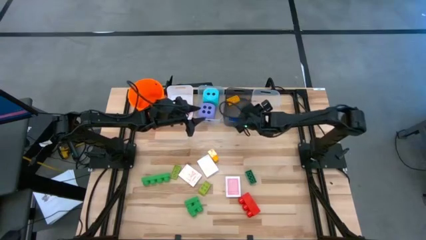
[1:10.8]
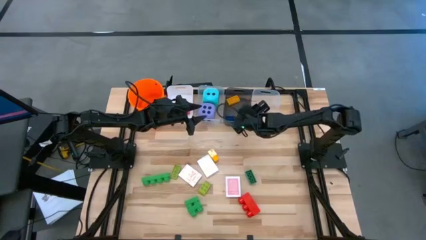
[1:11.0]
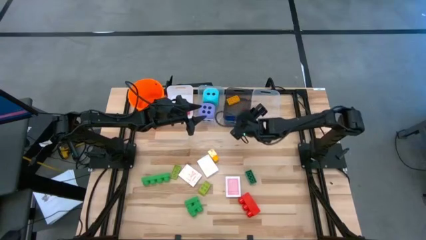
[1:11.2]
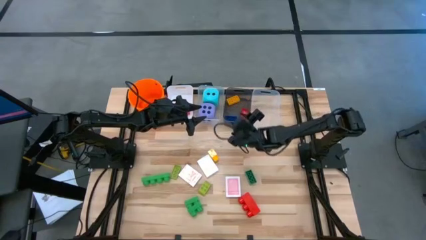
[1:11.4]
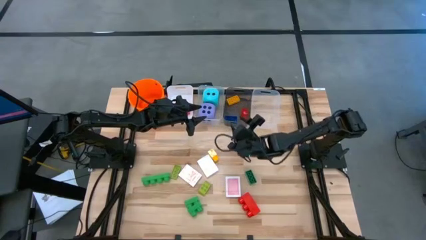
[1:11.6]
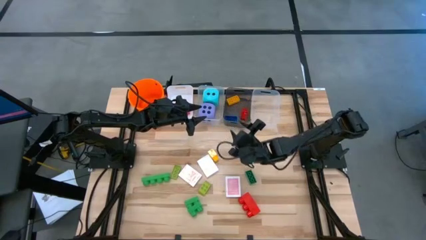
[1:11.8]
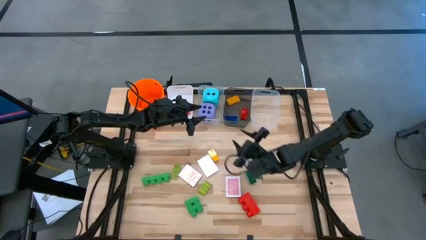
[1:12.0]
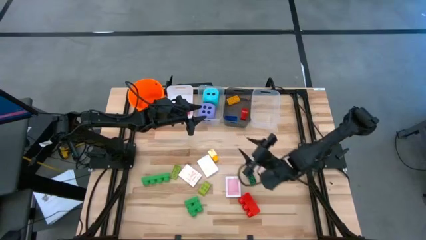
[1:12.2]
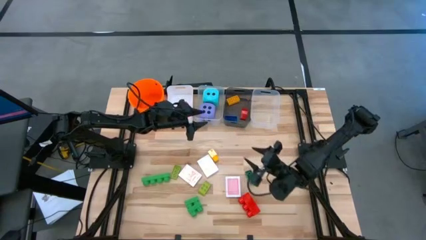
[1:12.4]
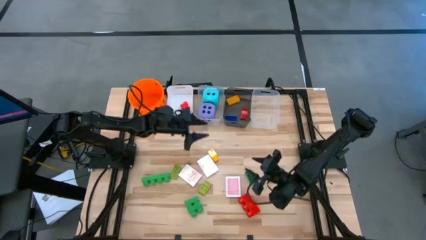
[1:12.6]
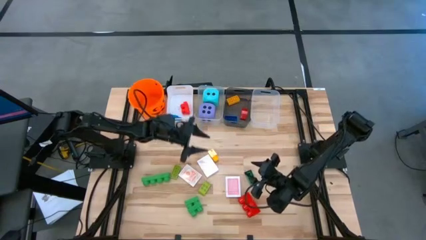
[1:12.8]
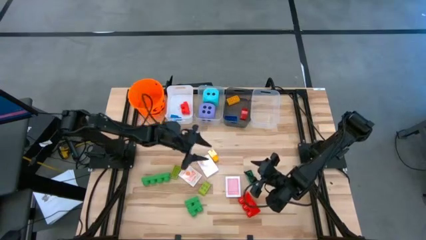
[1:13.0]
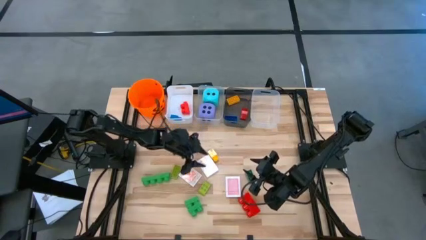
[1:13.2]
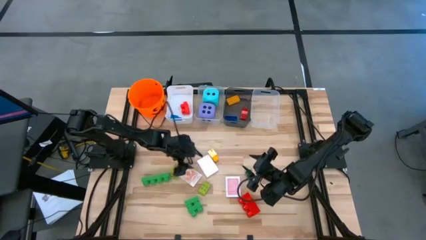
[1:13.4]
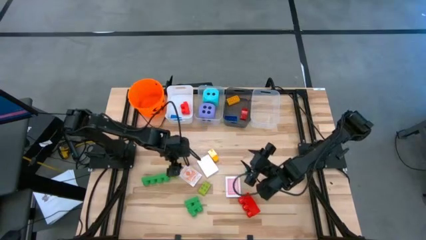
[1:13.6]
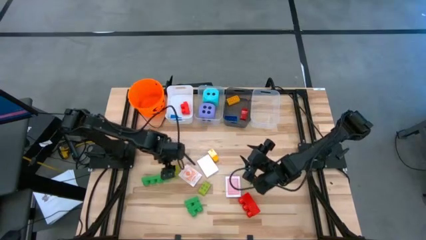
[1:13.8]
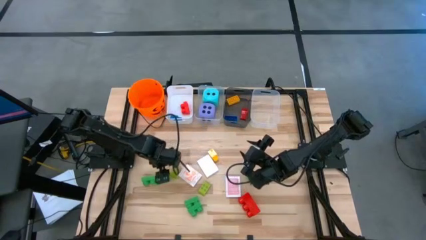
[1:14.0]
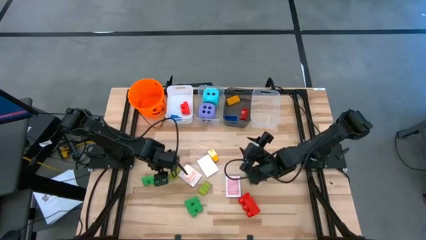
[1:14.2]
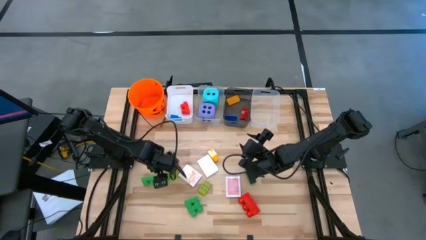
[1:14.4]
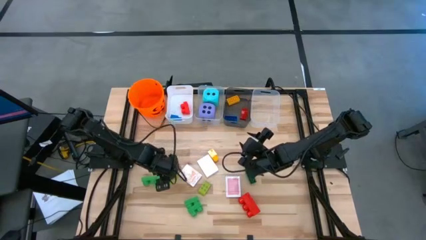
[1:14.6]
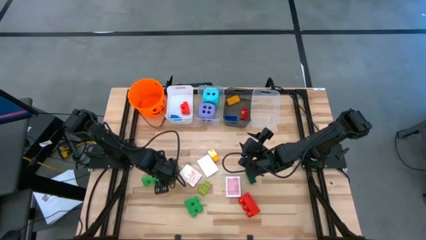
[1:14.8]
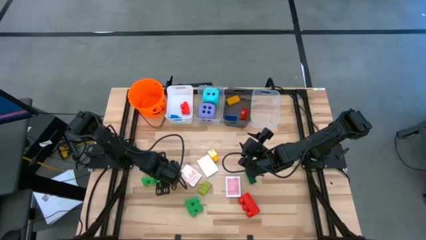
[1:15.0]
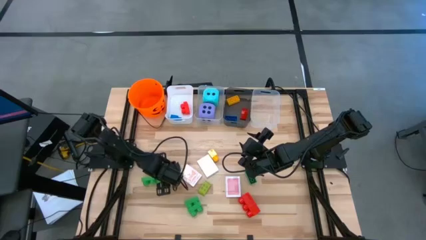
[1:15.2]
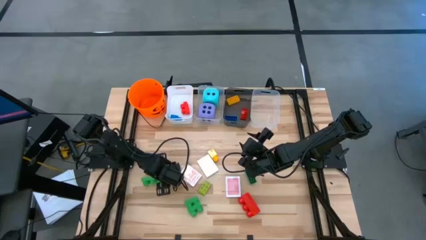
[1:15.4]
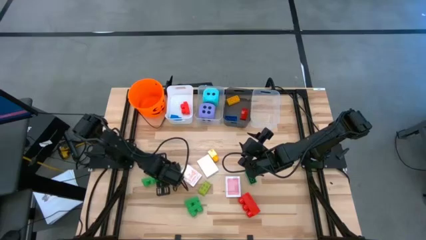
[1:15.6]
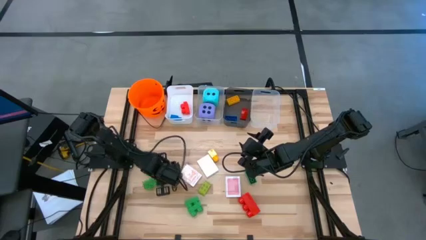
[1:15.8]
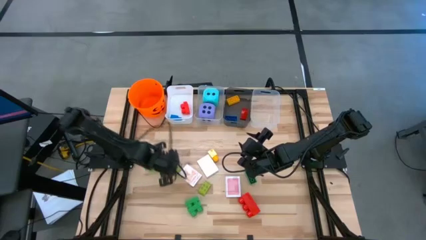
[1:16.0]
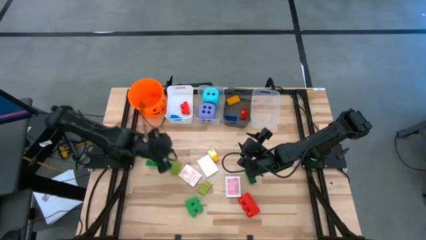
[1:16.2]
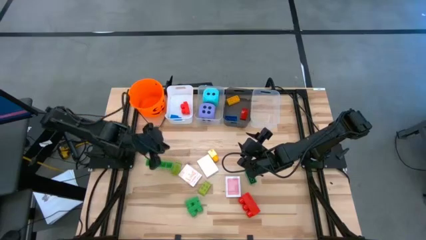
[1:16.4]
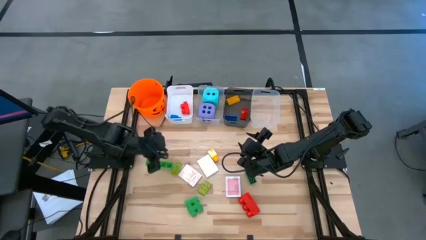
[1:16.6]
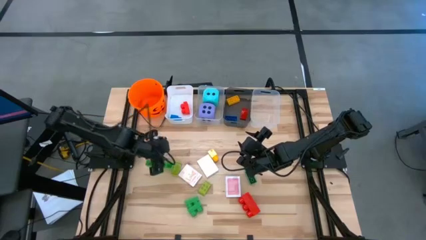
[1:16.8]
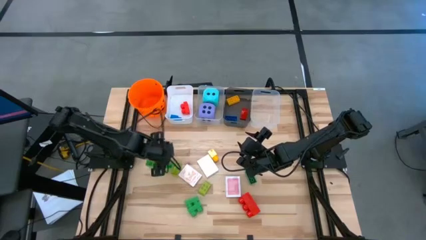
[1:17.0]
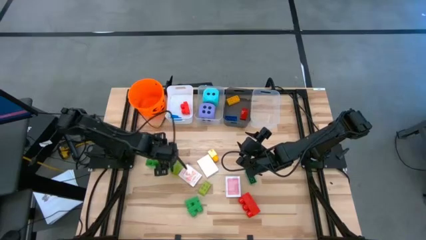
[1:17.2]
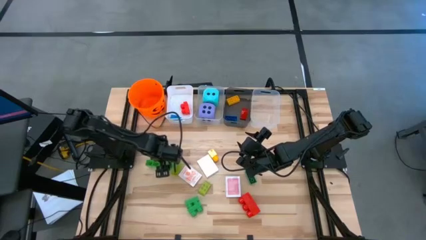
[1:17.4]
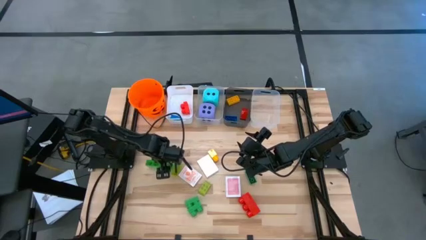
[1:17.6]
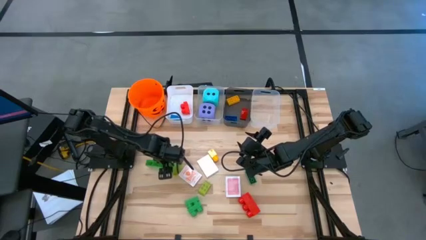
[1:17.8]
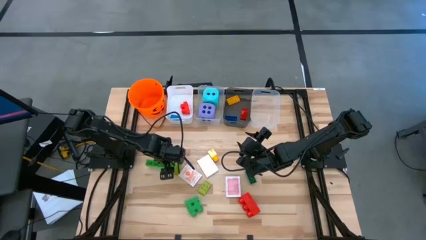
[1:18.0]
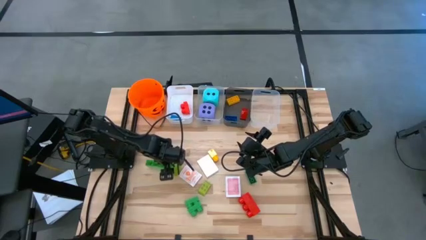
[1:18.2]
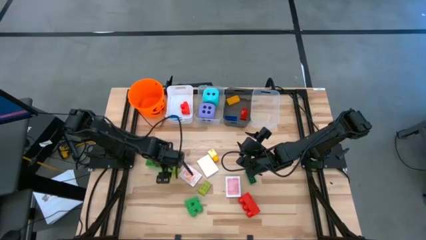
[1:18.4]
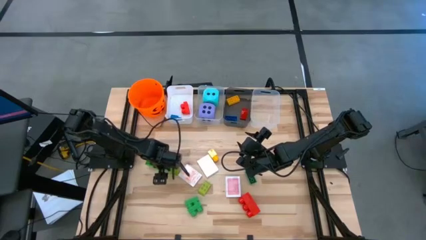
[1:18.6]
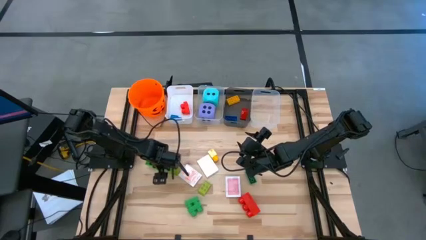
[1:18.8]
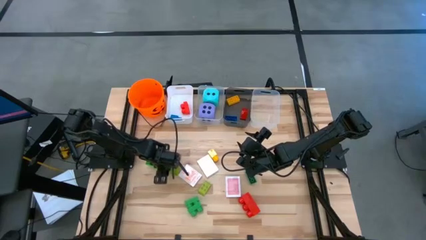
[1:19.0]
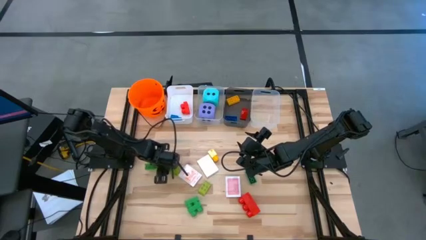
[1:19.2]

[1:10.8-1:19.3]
Task: Pick & Place Toys
Put the left green game piece into the white bin

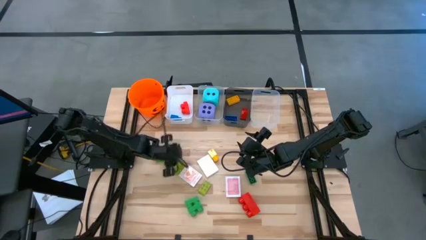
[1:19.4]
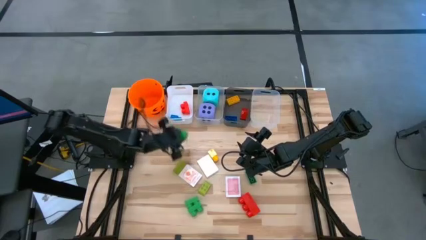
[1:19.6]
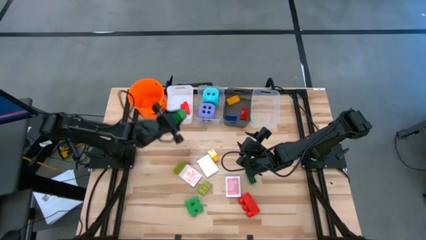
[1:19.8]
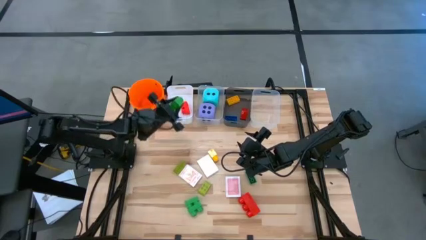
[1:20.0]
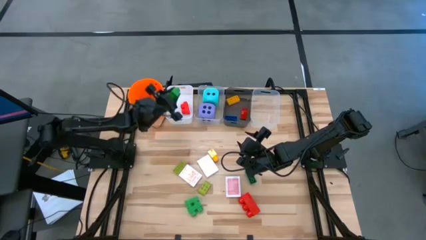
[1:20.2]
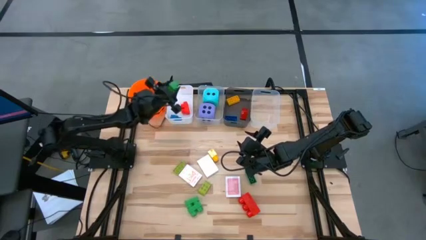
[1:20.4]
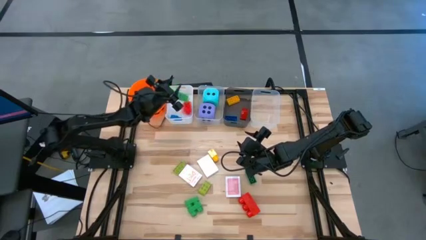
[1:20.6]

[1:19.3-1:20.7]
Put the left green game piece into the white bin

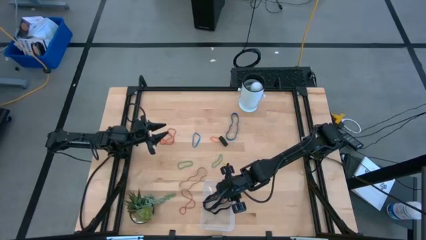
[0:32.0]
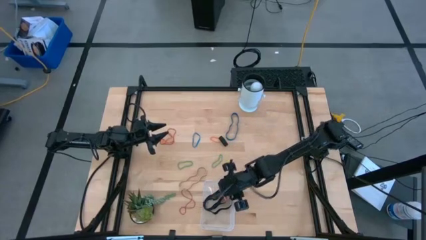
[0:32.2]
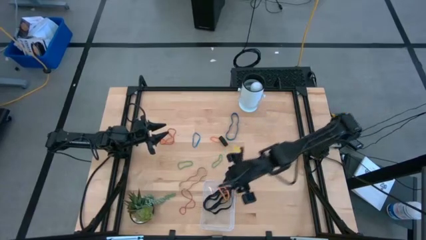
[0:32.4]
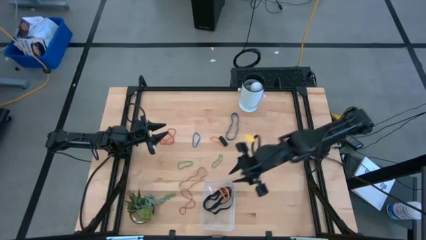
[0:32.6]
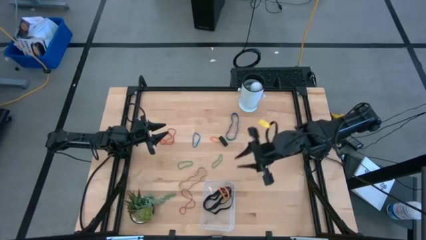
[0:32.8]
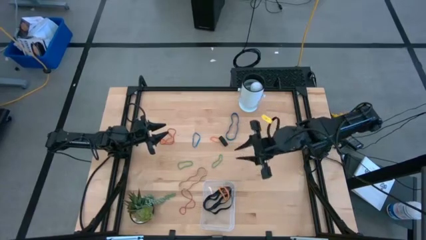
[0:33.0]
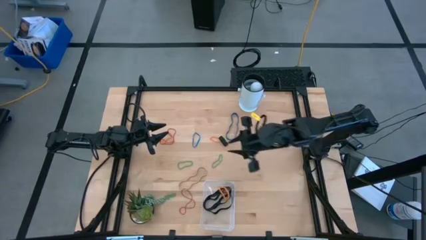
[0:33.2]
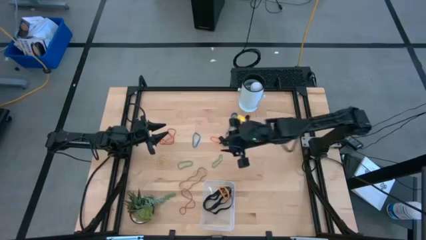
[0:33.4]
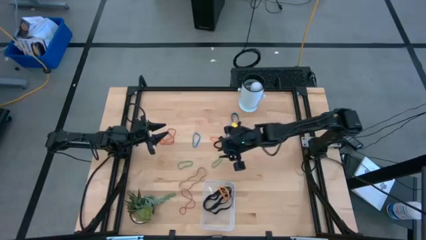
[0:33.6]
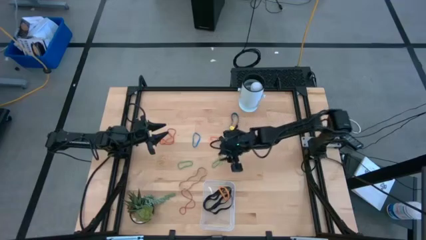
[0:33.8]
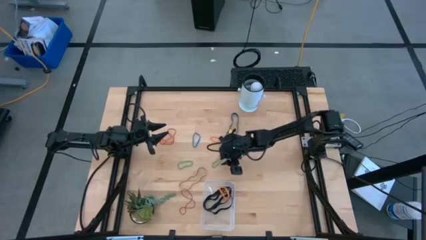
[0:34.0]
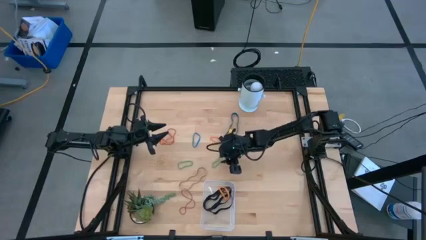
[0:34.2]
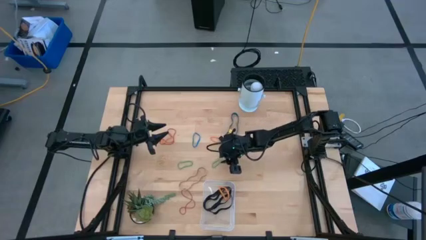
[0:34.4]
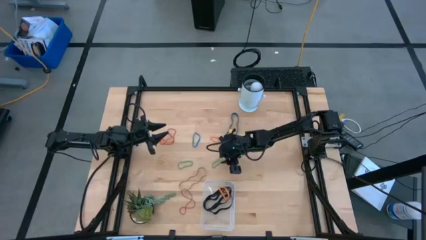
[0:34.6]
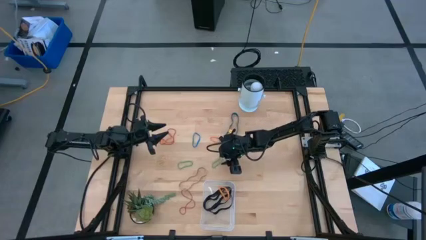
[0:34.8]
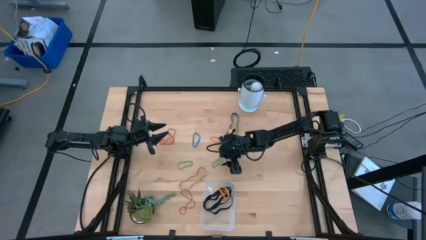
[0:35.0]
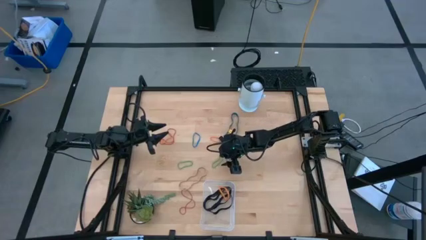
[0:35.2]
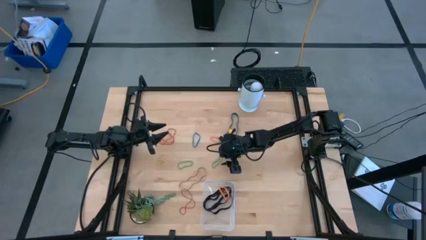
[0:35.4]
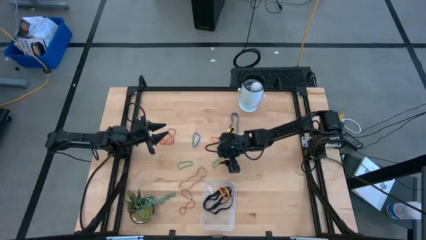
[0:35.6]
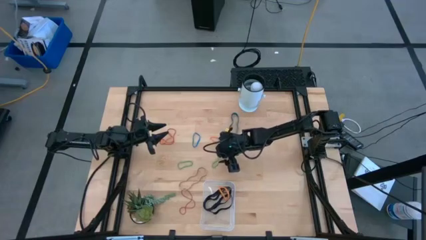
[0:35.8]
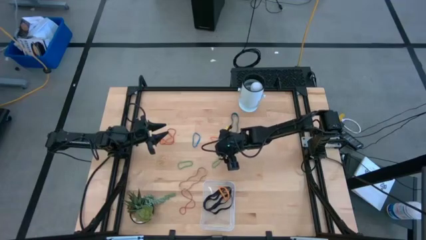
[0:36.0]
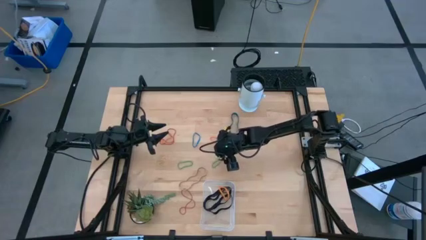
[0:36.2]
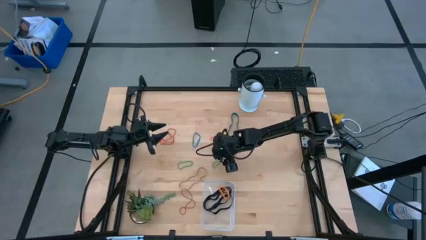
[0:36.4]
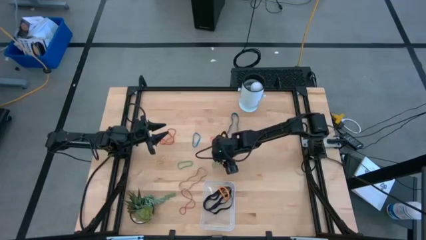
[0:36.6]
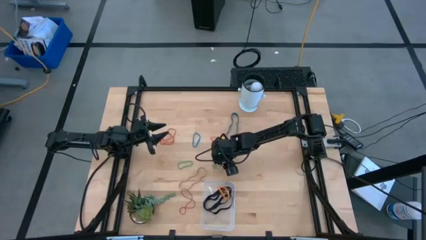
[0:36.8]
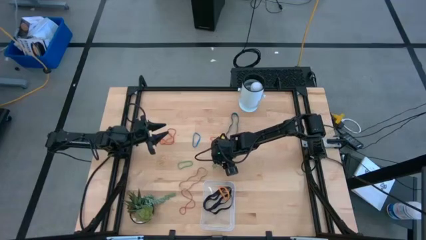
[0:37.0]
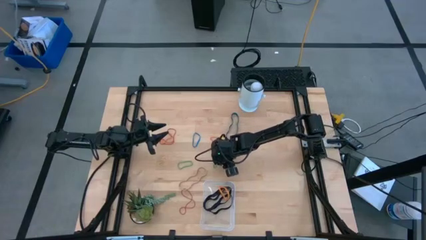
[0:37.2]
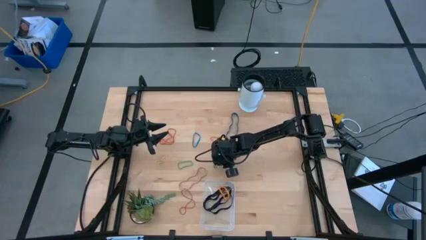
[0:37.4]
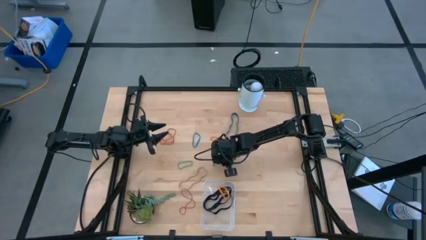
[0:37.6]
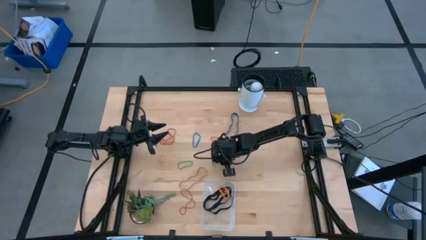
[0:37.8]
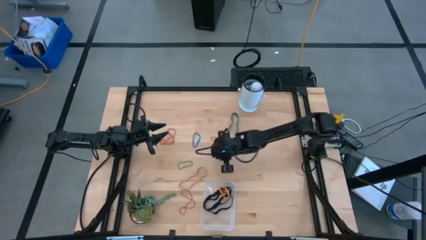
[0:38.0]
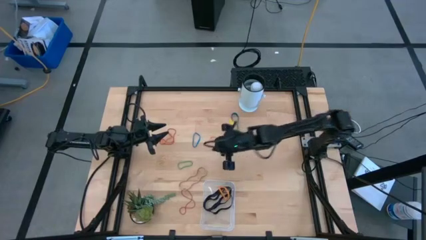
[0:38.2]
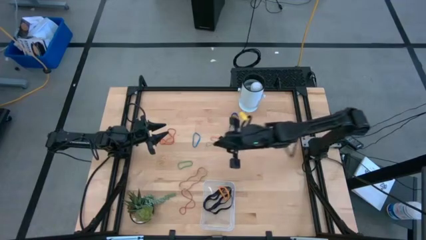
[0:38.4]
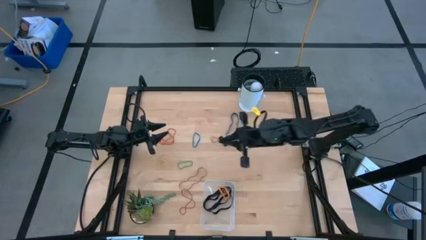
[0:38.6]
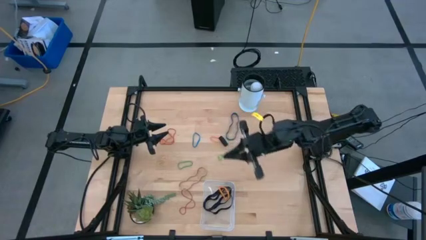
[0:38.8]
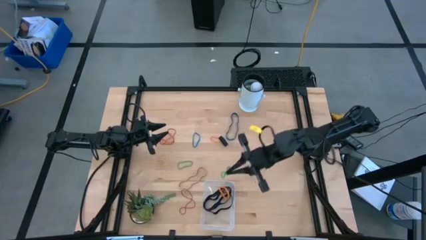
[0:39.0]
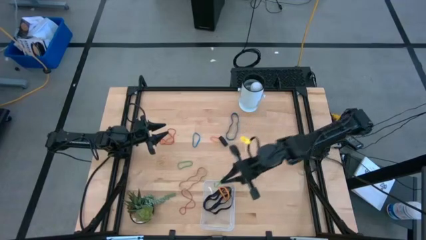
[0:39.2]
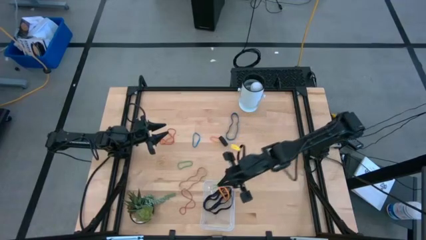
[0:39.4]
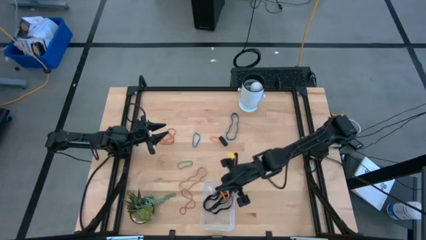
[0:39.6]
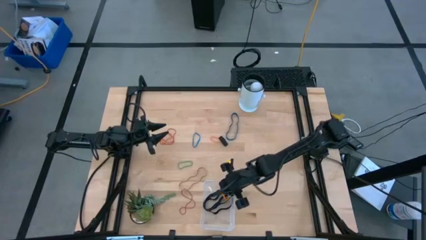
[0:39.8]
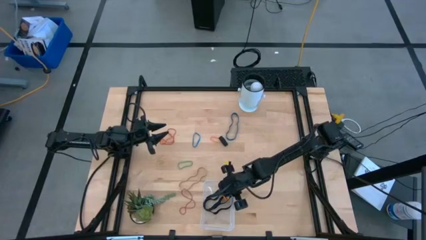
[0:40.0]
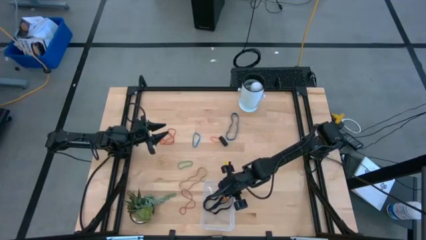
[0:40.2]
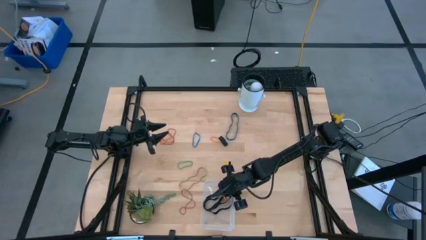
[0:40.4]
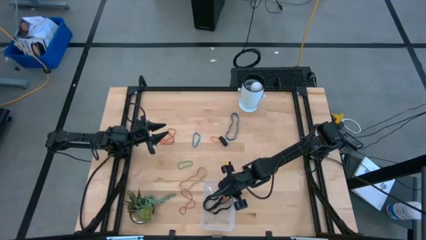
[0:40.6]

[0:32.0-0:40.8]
Task: Pick and place rubber bands into bin
Put the green rubber band into the transparent bin
